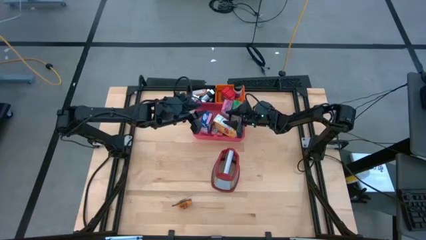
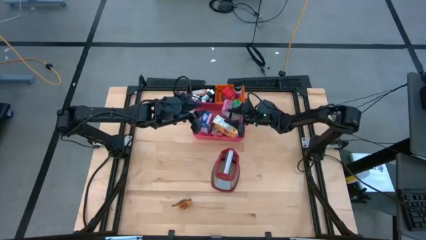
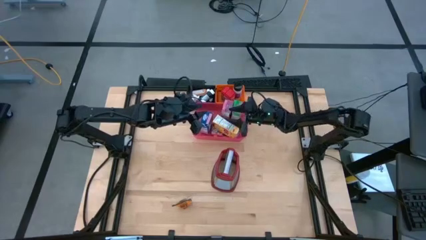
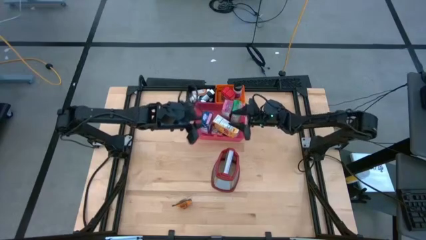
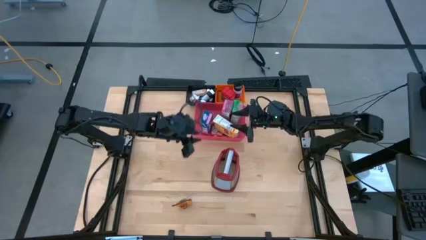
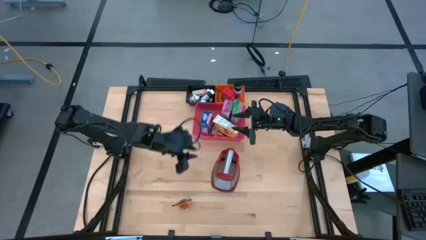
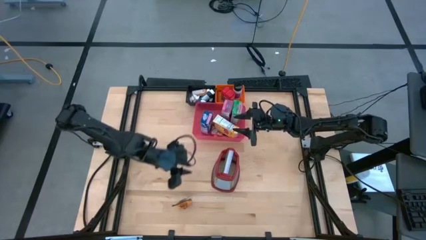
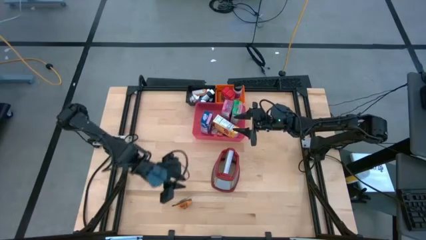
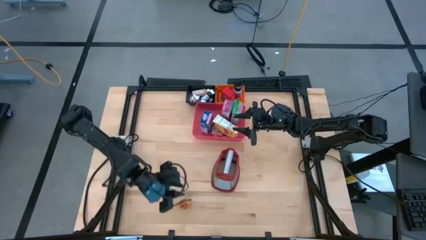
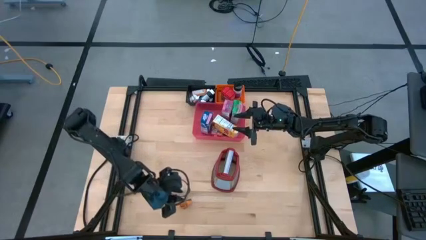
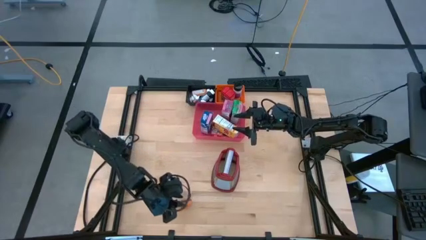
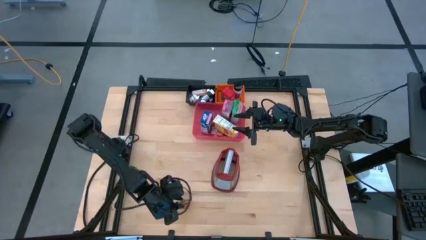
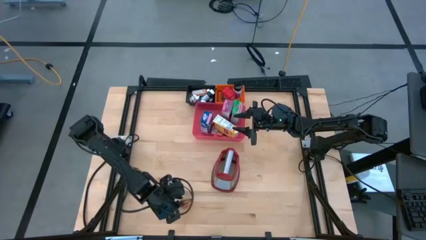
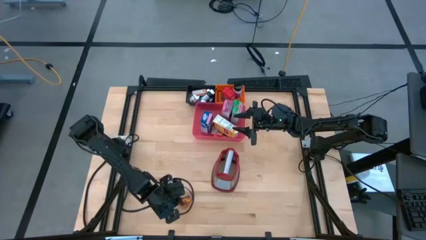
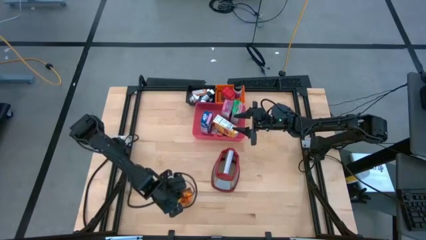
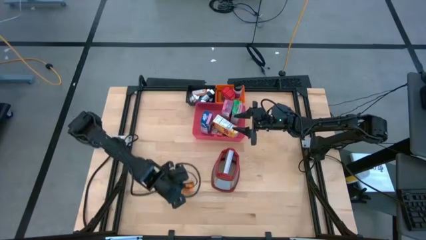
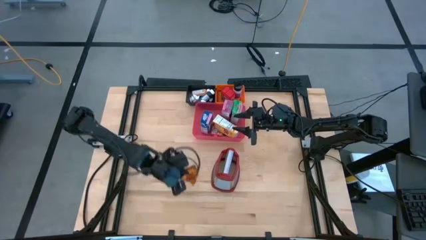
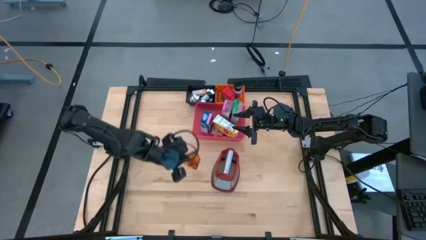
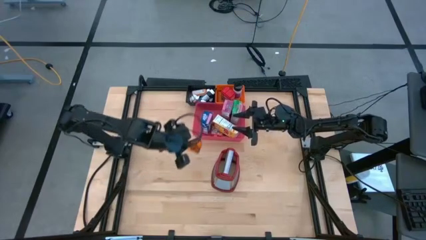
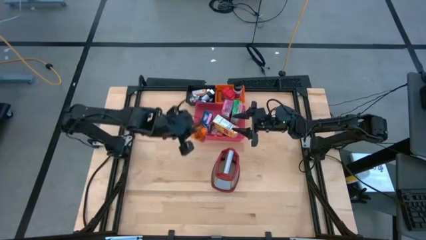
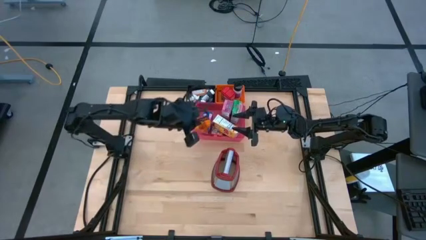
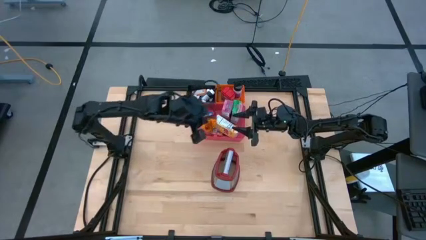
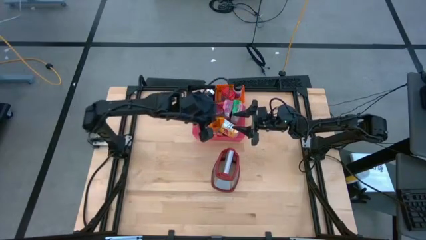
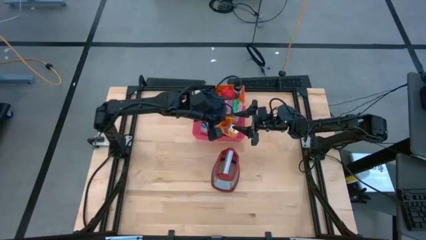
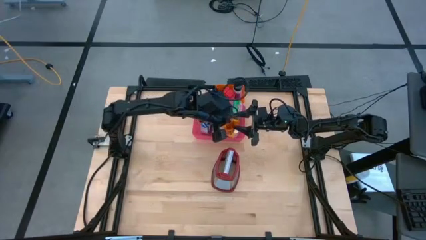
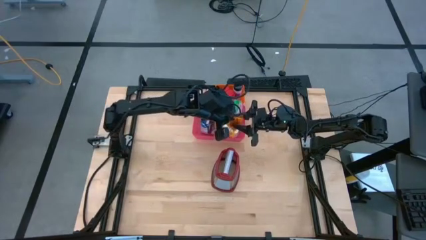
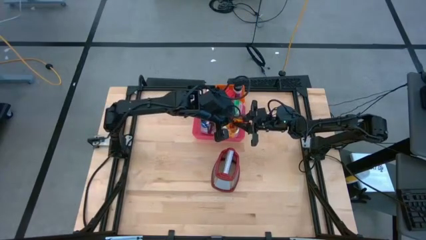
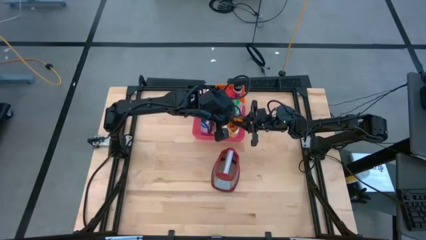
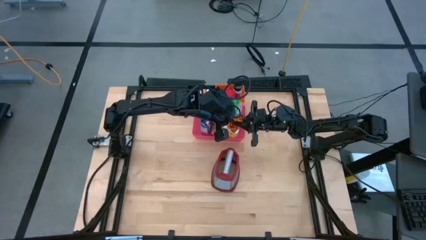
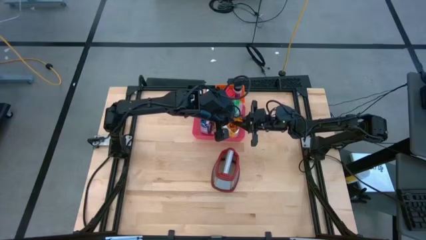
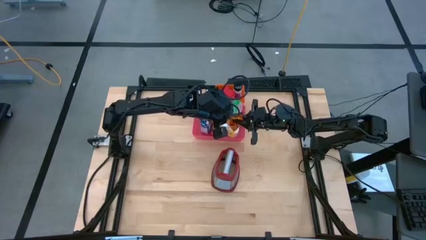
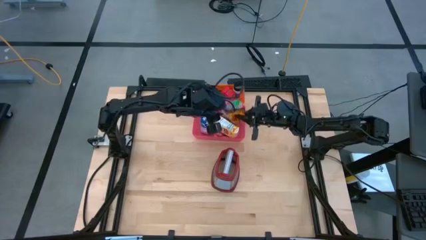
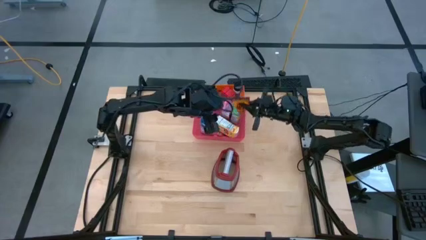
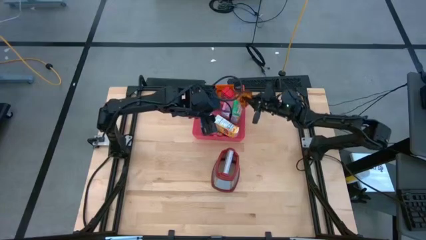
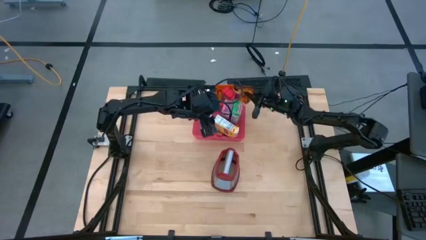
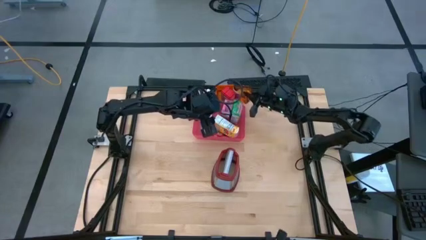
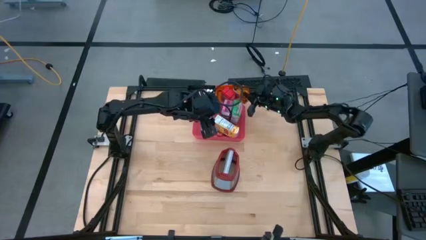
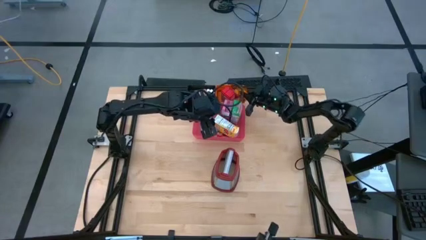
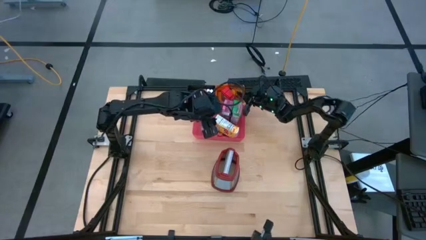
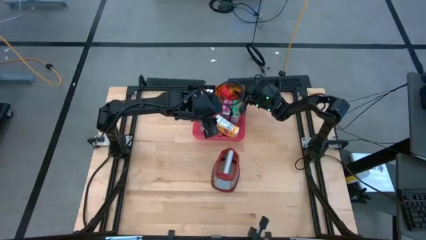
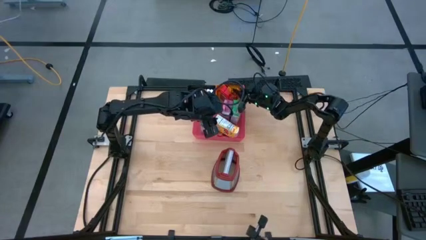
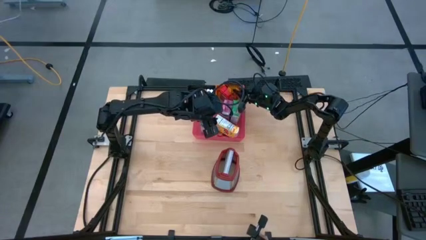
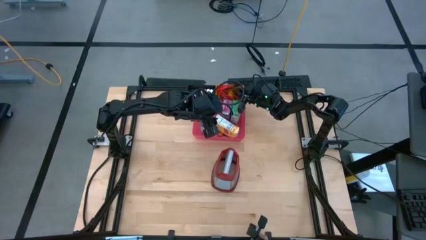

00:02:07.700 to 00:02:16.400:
Task: Pick & Place Kitchen Items
Put the orange seasoning pack into orange basket

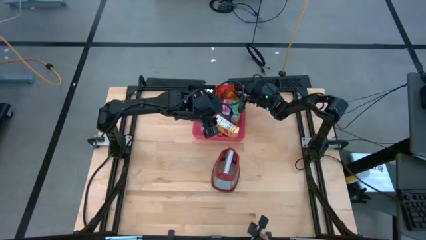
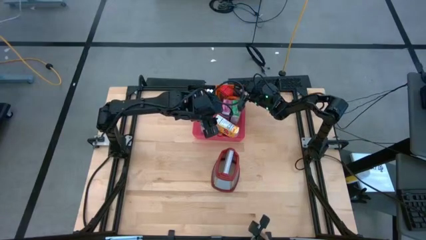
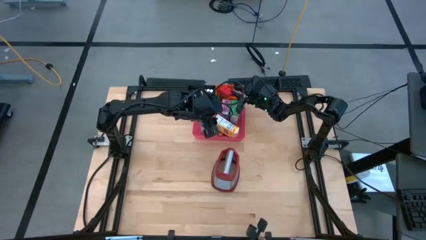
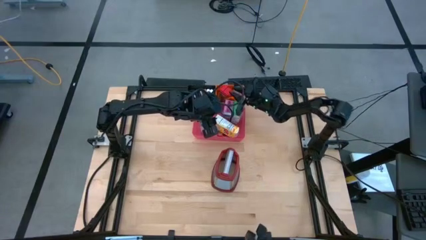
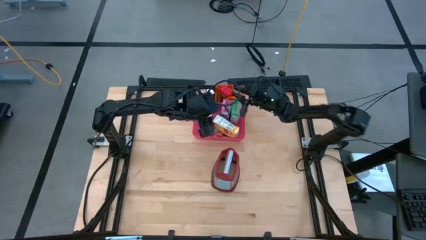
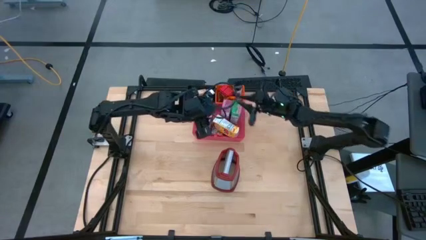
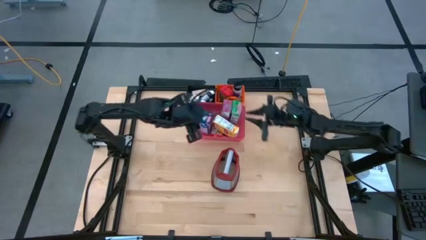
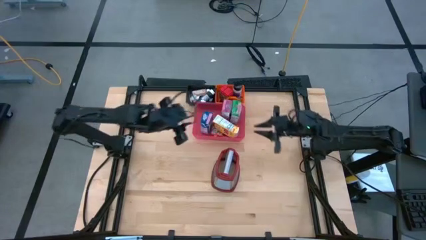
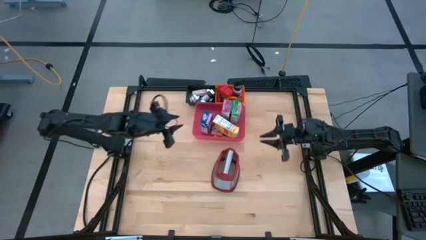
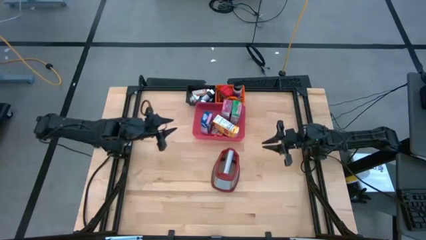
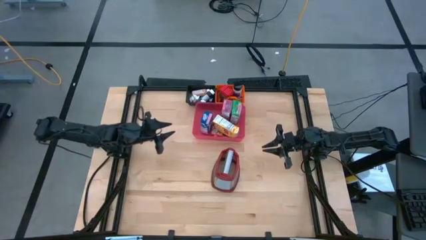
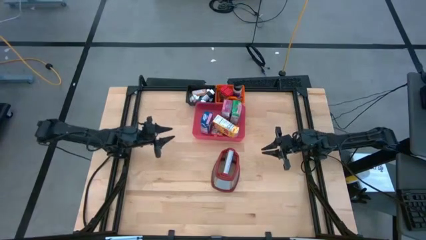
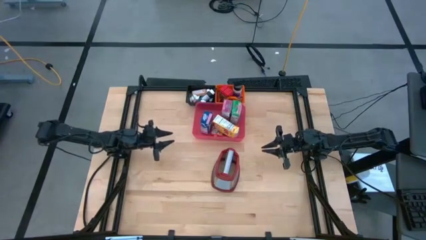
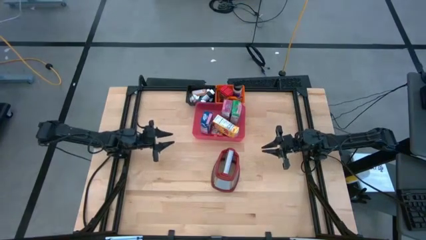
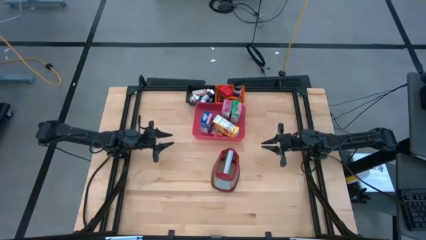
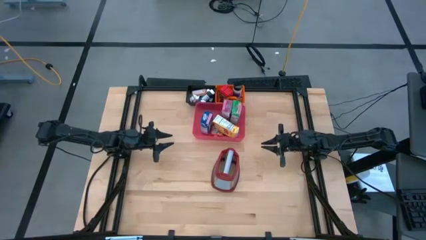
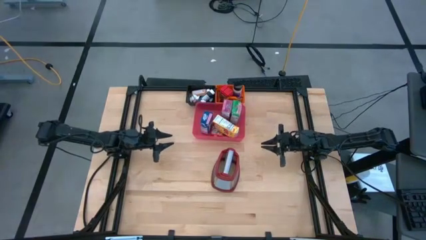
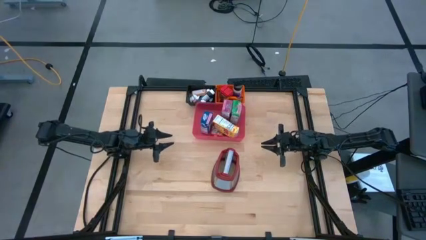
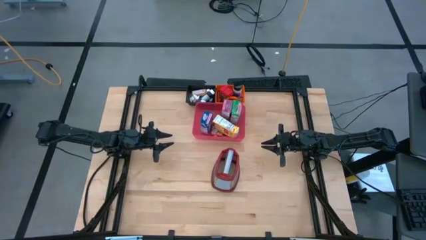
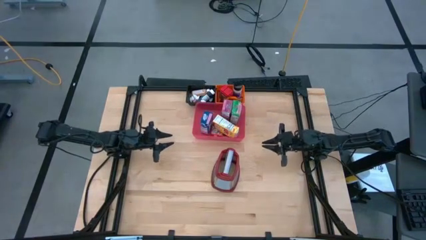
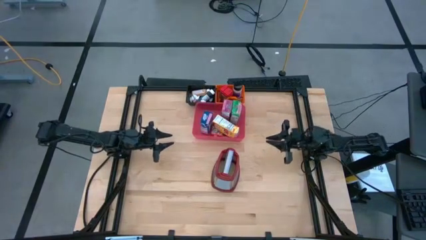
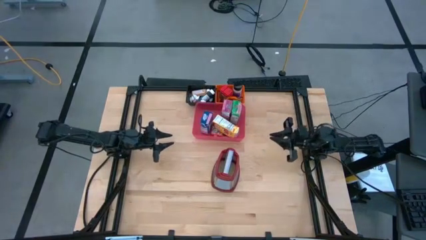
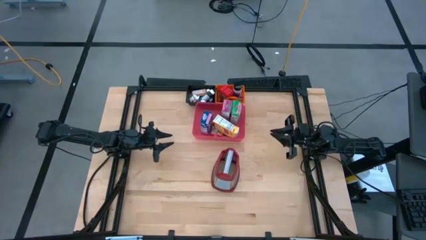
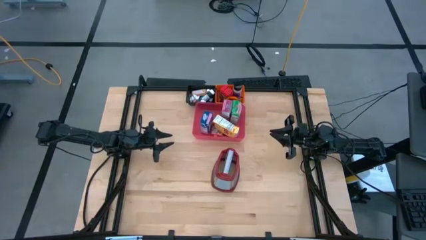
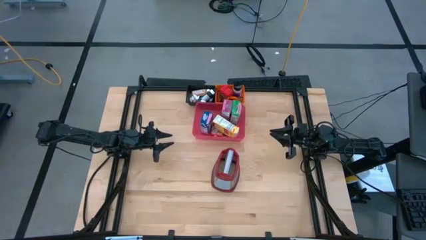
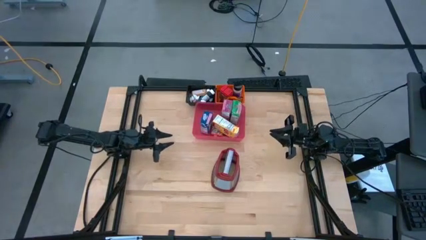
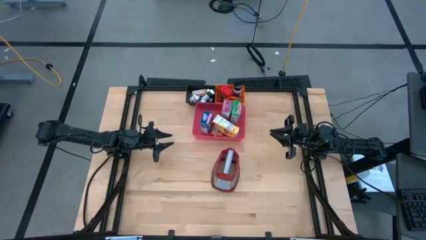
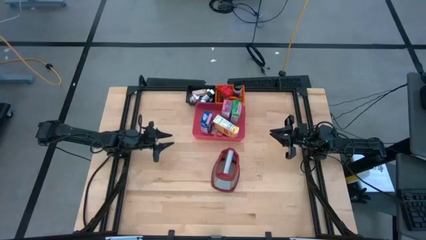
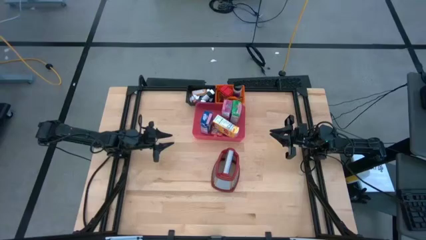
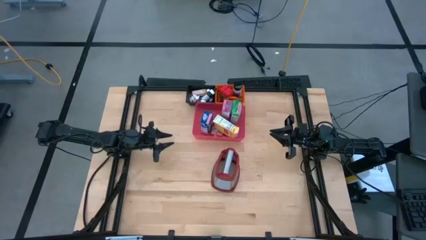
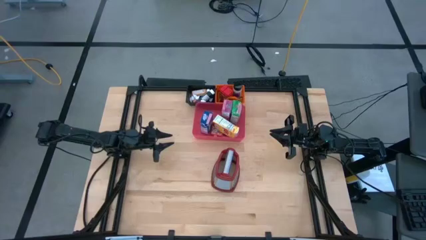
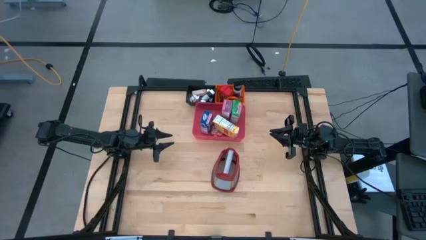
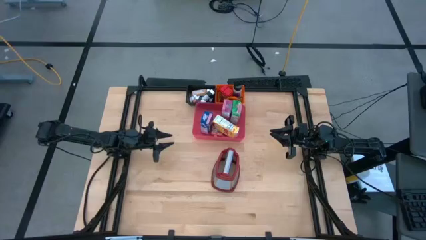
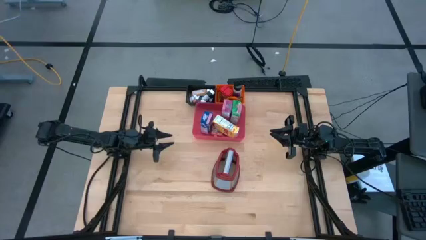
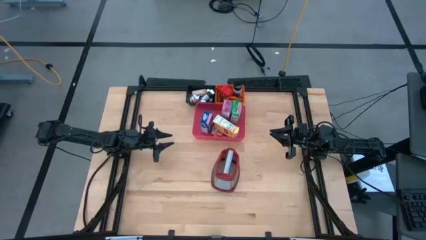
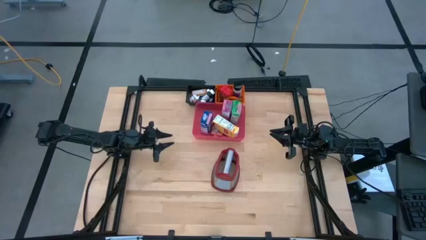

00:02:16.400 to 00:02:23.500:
Return to Home Position

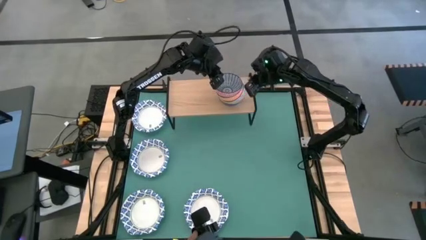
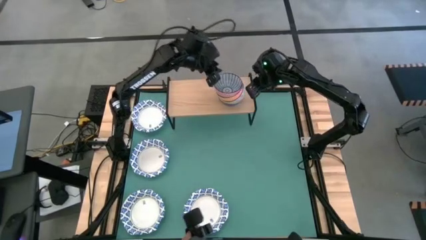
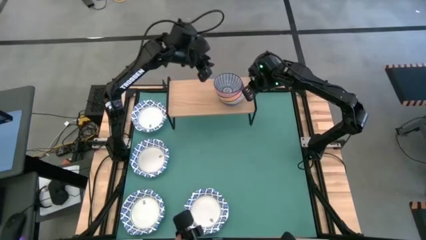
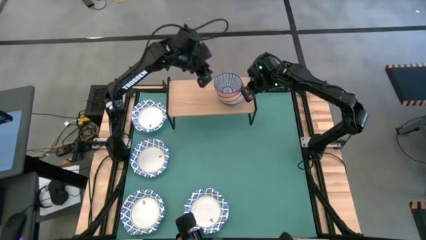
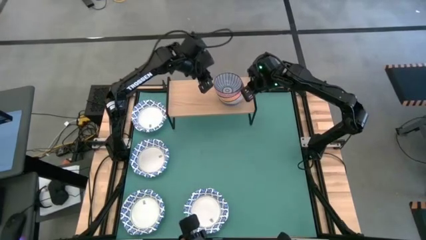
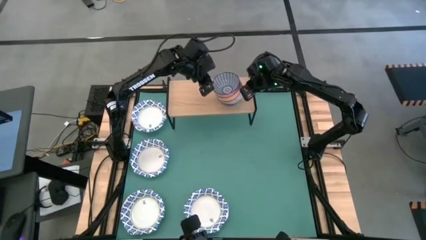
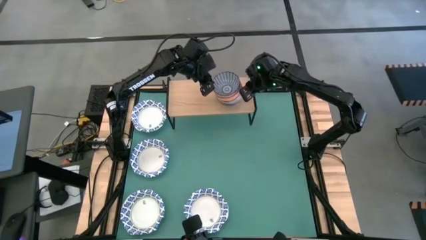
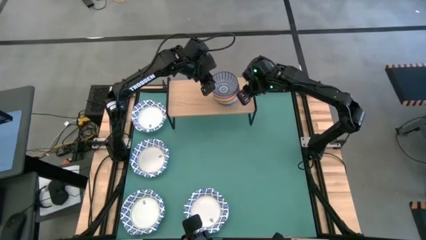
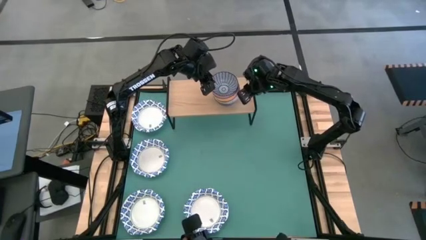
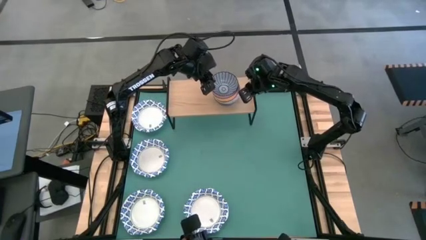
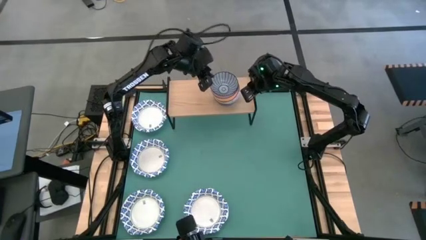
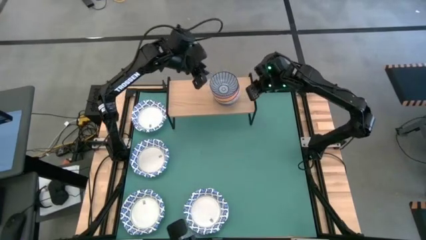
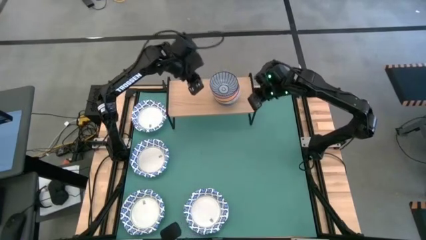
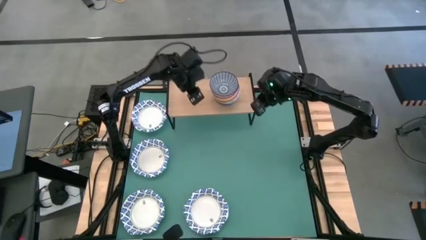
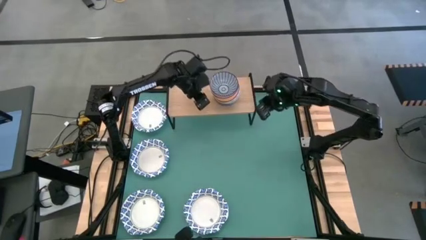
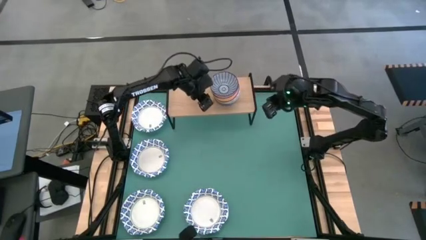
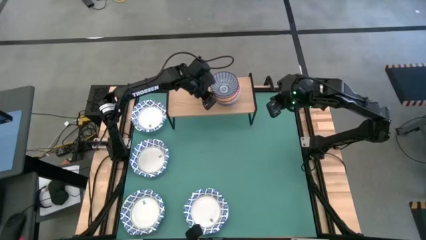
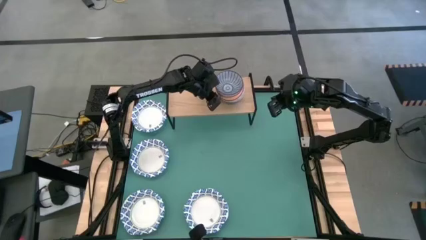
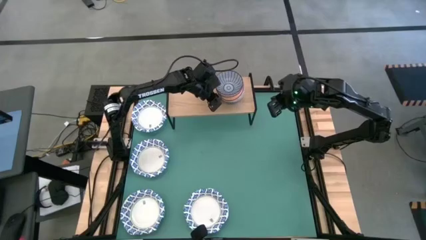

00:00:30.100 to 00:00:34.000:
Task: Place and stack bowls onto a shelf
Adjust the stacked small bowls on the shelf
